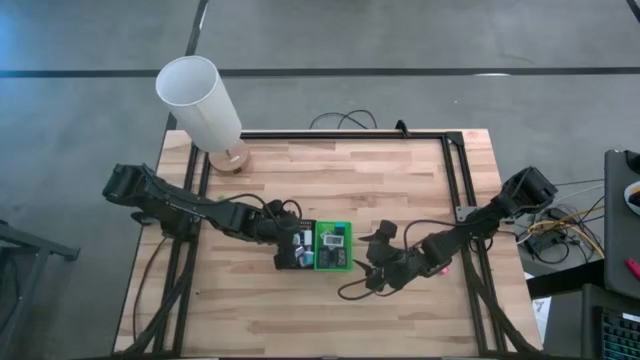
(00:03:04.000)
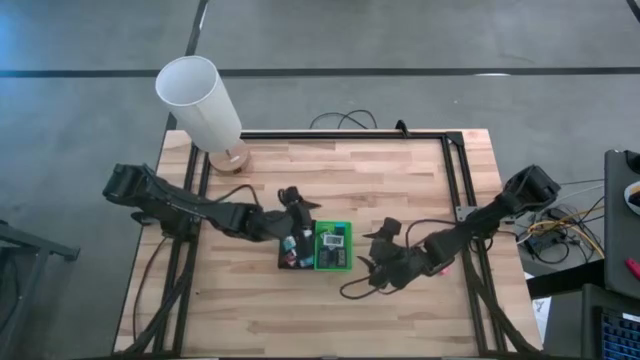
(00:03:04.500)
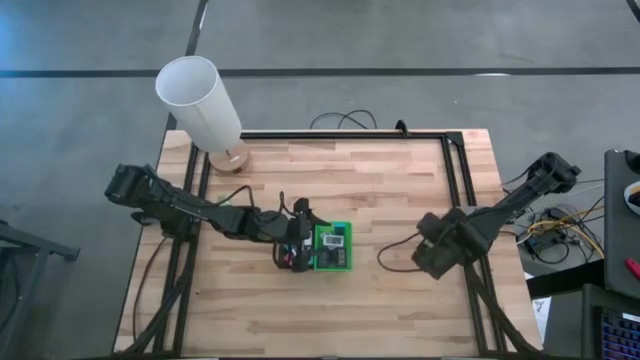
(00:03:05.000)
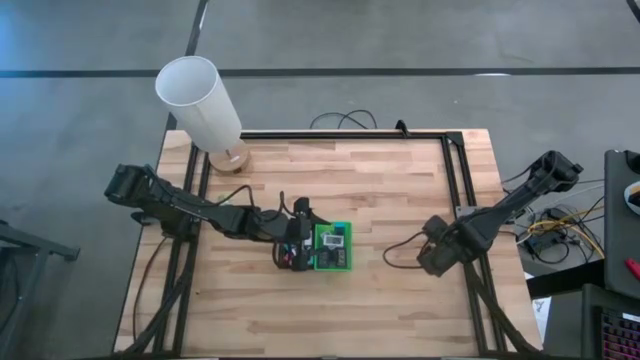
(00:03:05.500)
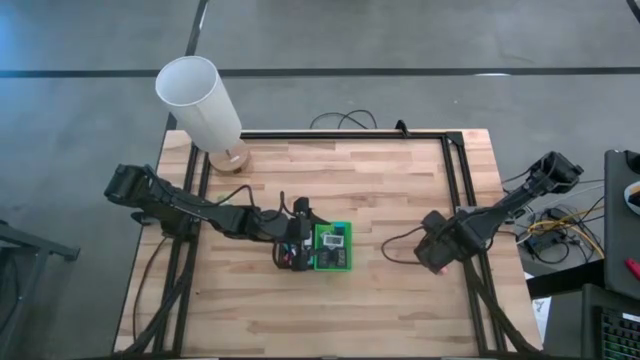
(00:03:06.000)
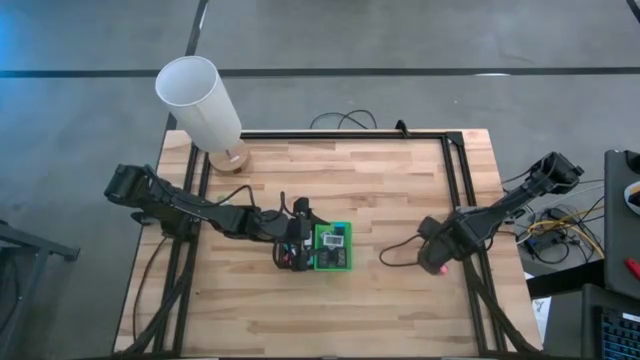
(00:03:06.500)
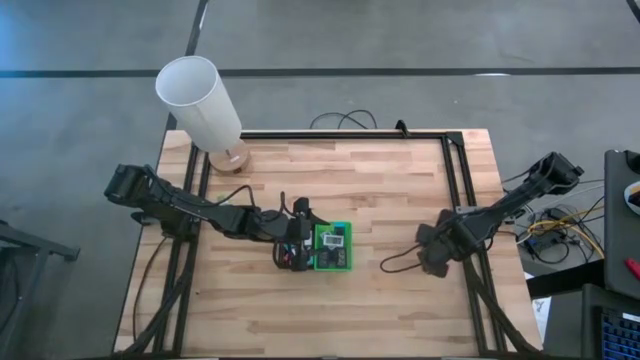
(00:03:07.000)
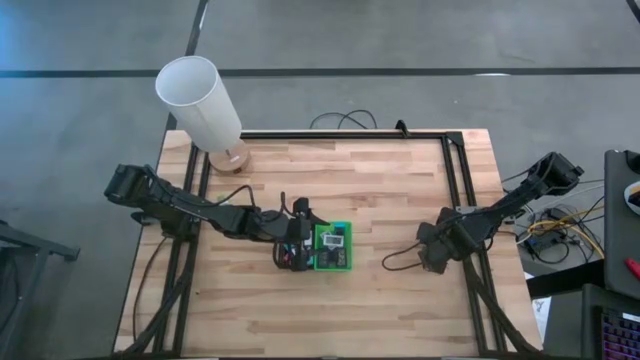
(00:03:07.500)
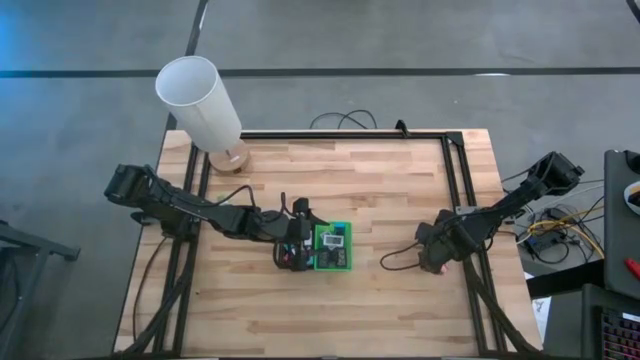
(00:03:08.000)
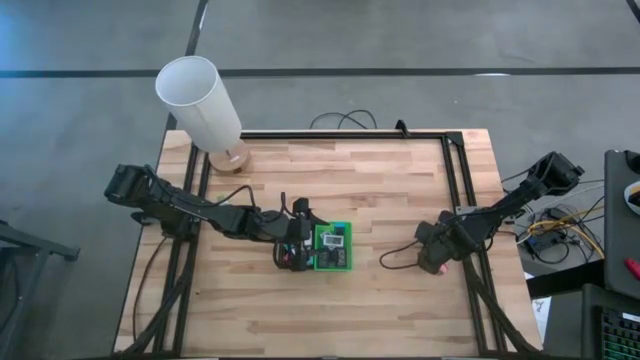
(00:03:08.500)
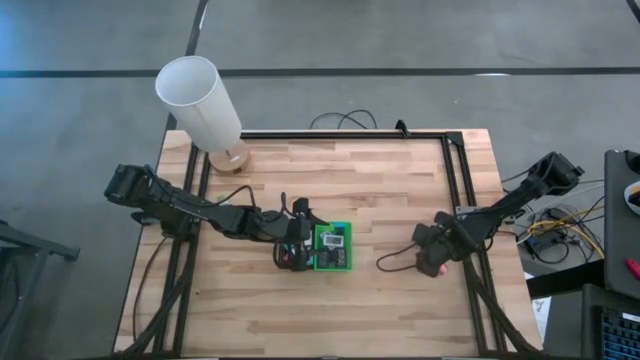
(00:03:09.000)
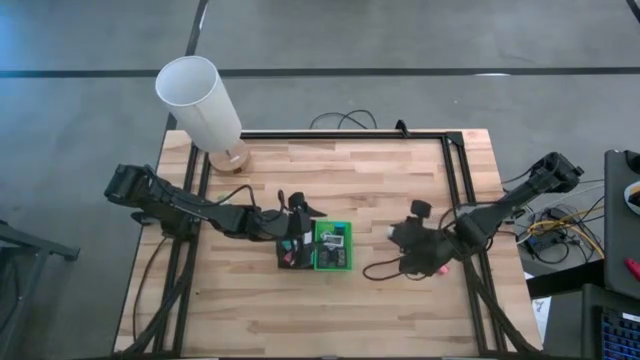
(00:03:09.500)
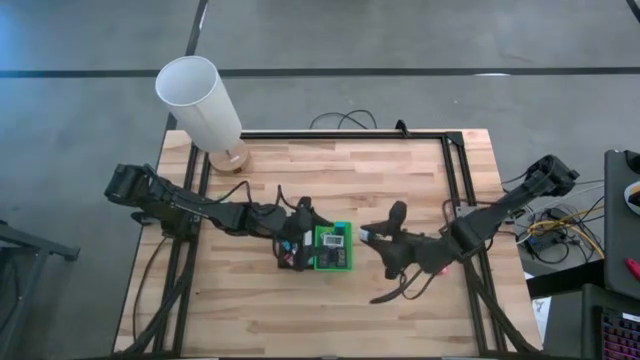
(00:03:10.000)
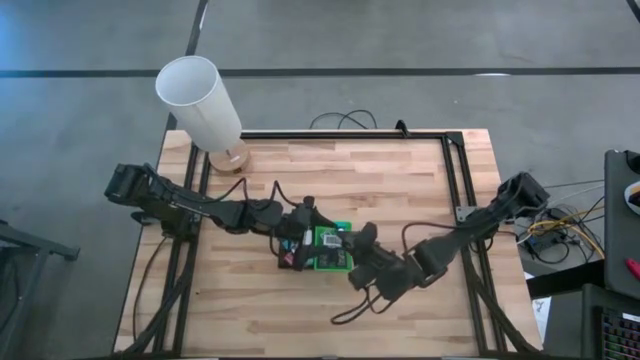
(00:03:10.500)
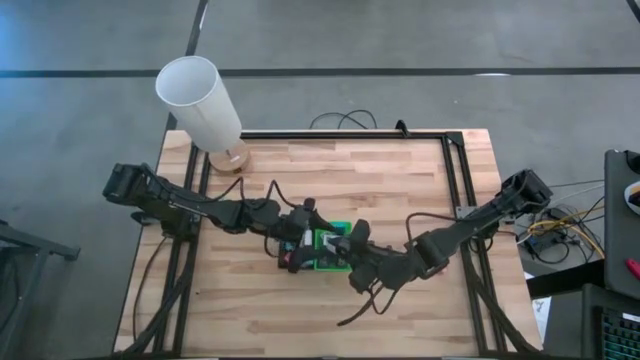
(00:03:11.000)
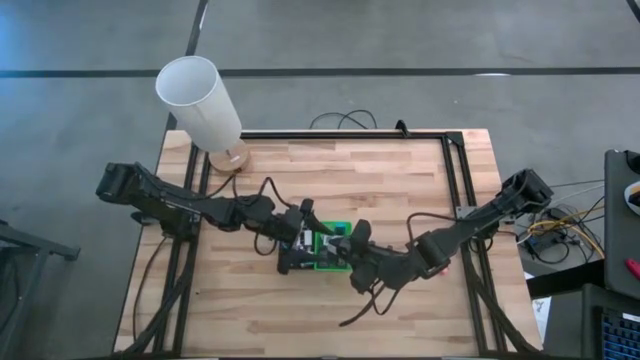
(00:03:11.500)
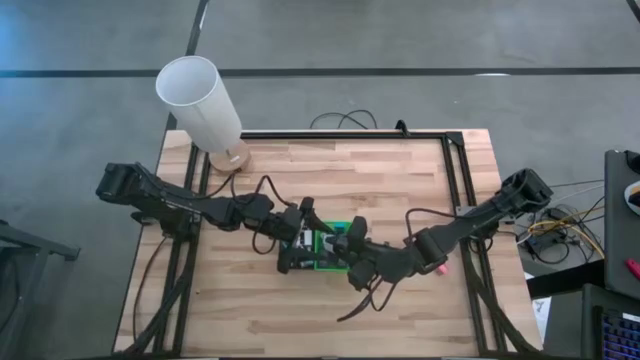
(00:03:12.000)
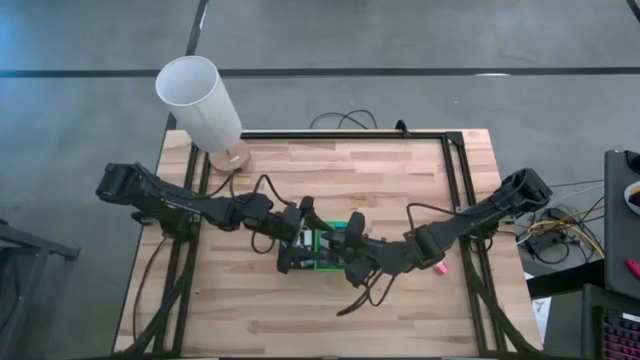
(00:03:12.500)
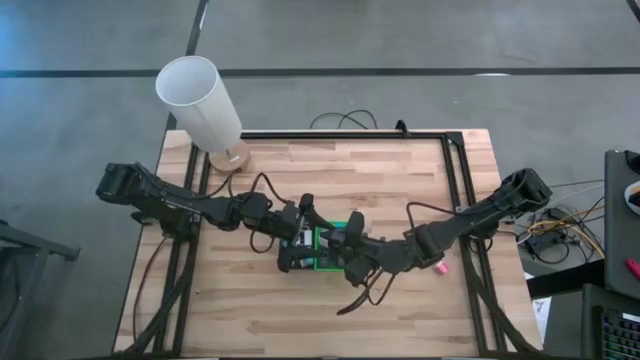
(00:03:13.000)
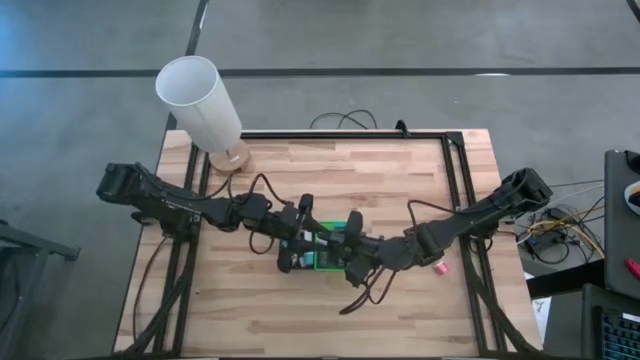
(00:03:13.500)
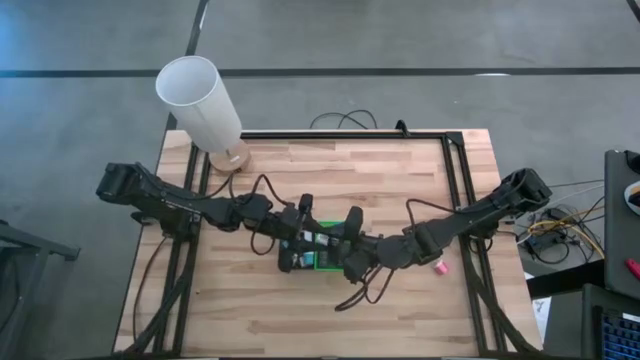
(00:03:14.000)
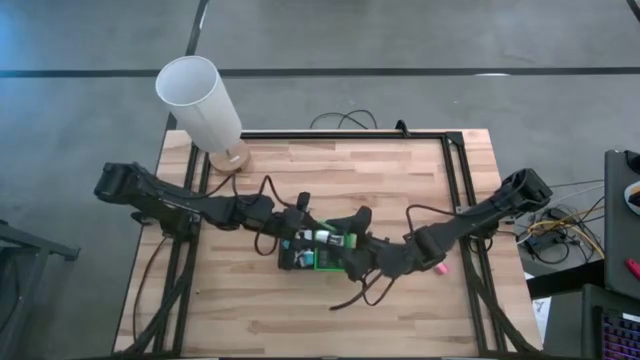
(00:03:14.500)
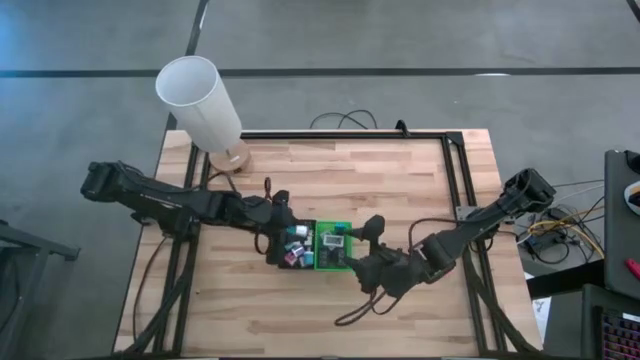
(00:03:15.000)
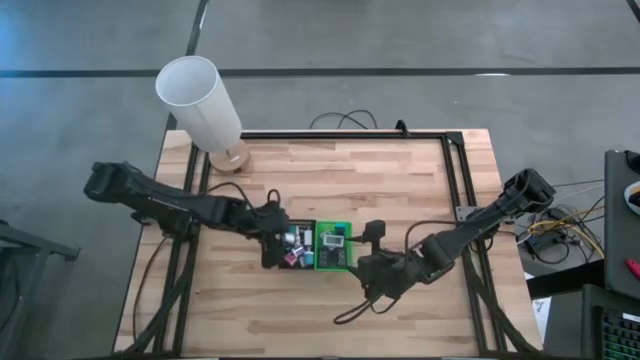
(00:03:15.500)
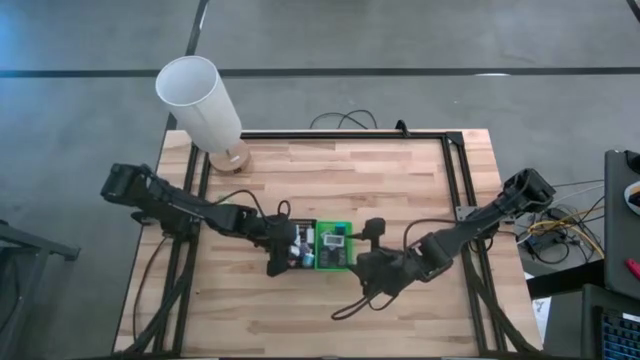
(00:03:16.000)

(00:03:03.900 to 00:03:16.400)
Task: Pick & Place Office items
Put the black white charger adapter into the black bin

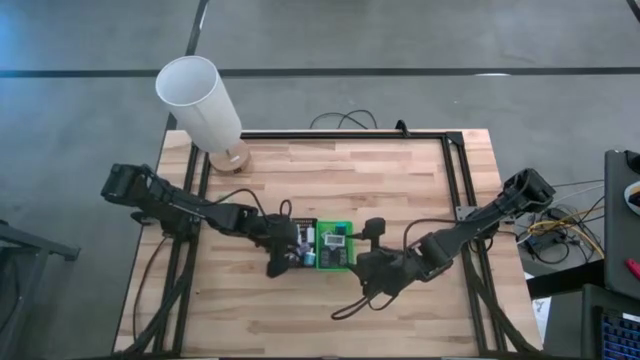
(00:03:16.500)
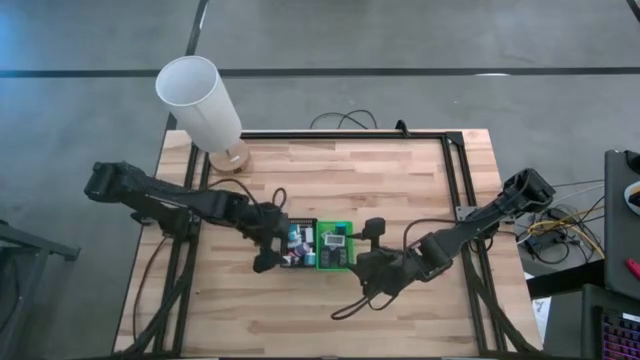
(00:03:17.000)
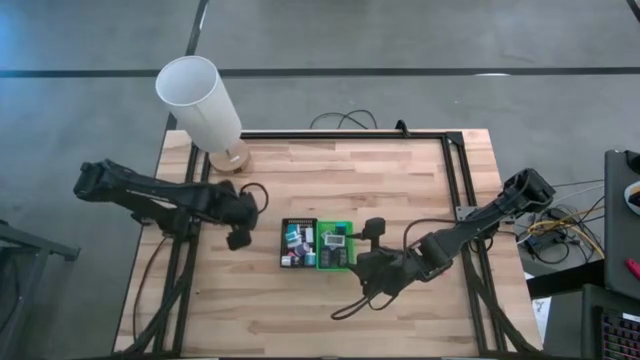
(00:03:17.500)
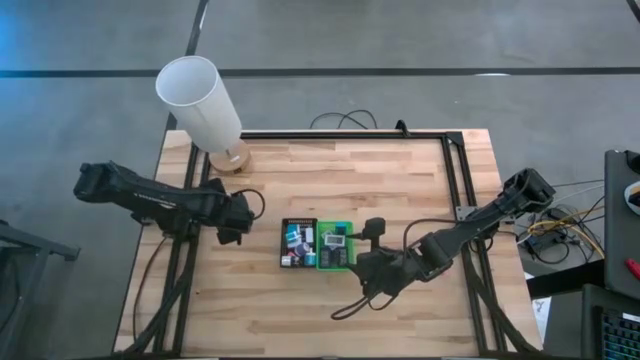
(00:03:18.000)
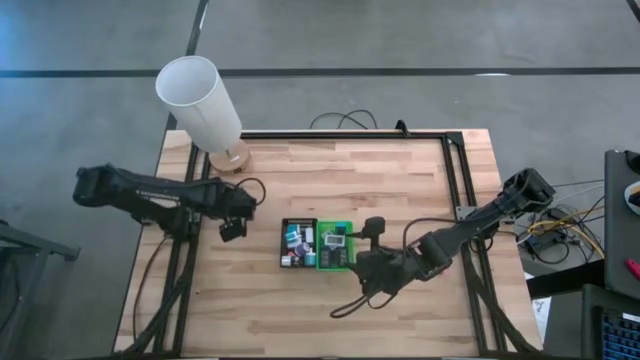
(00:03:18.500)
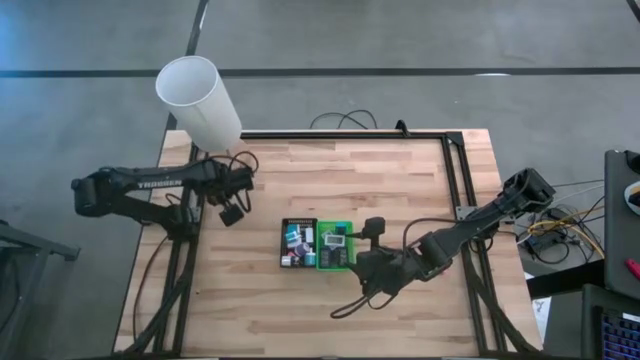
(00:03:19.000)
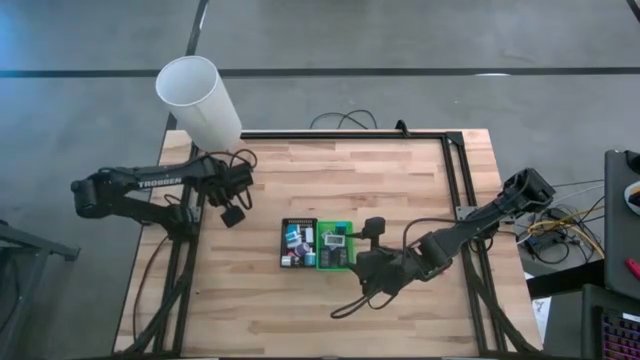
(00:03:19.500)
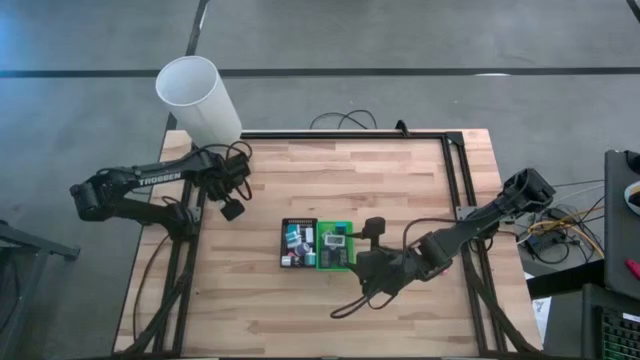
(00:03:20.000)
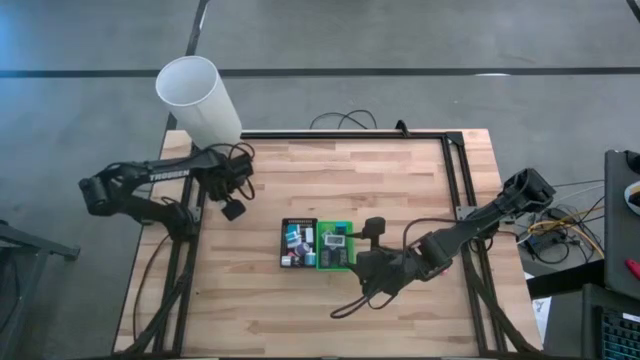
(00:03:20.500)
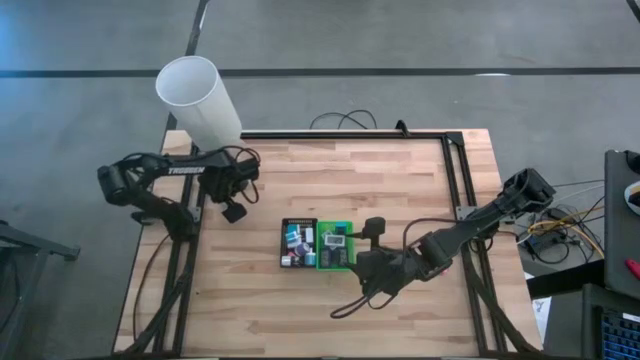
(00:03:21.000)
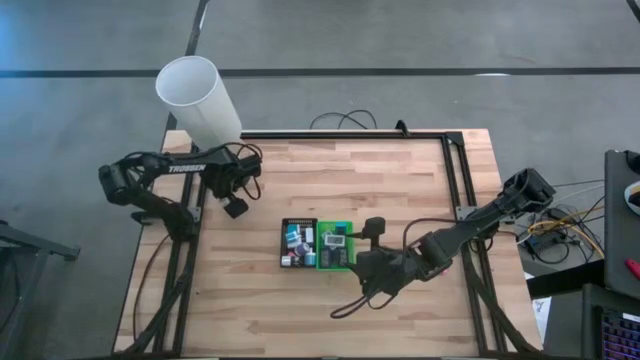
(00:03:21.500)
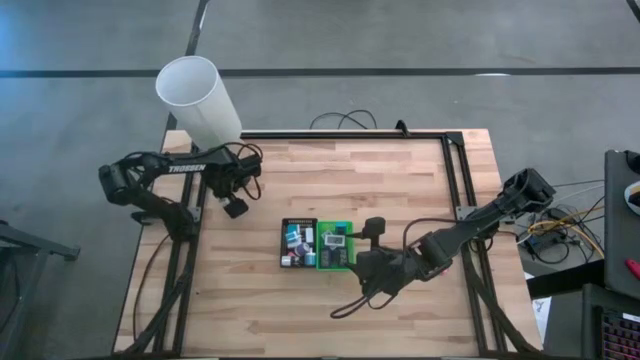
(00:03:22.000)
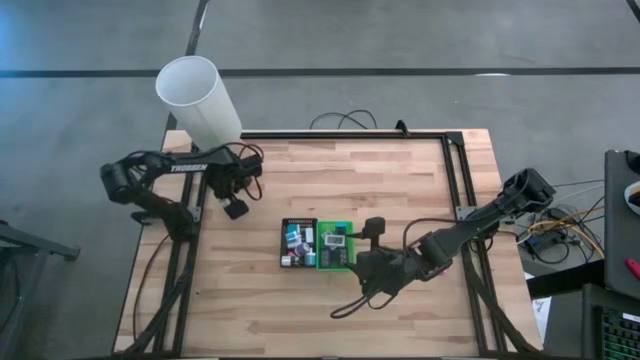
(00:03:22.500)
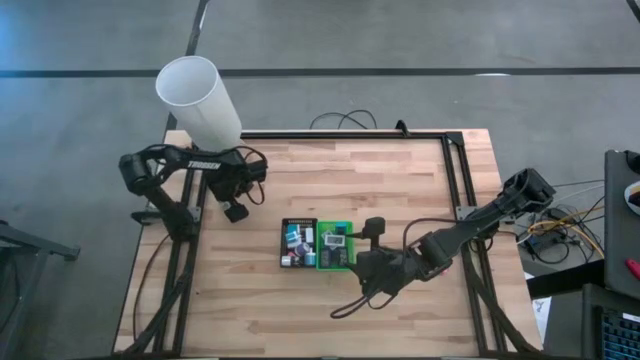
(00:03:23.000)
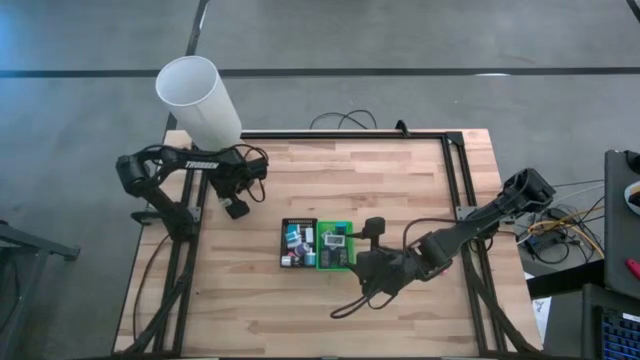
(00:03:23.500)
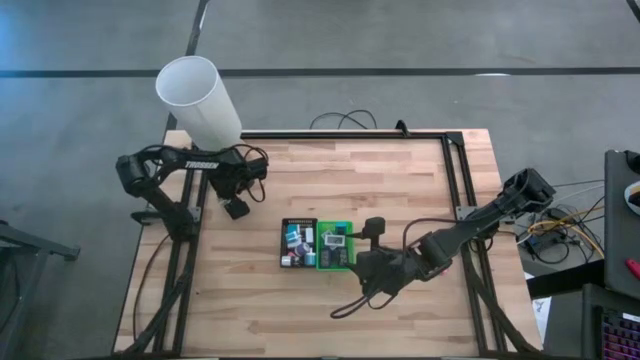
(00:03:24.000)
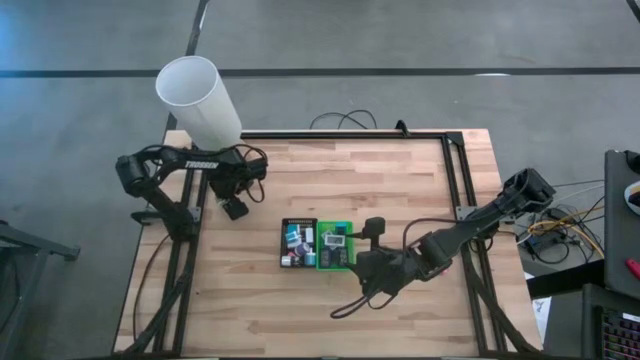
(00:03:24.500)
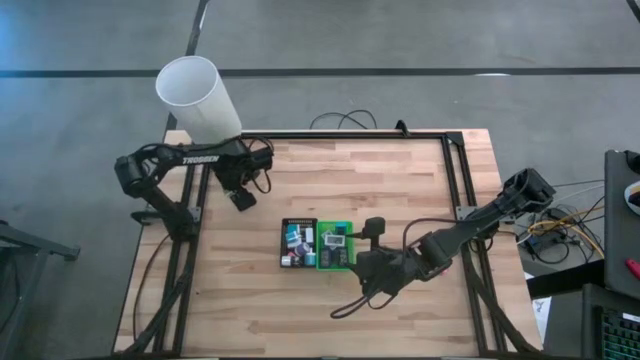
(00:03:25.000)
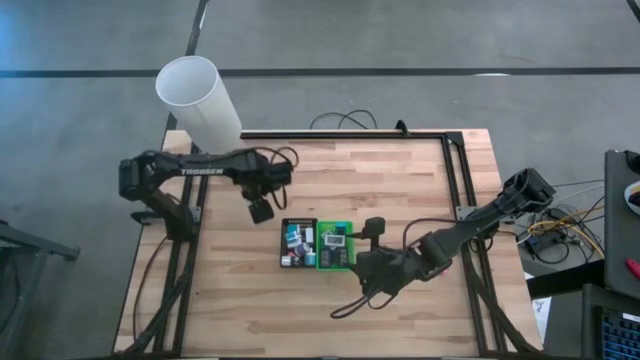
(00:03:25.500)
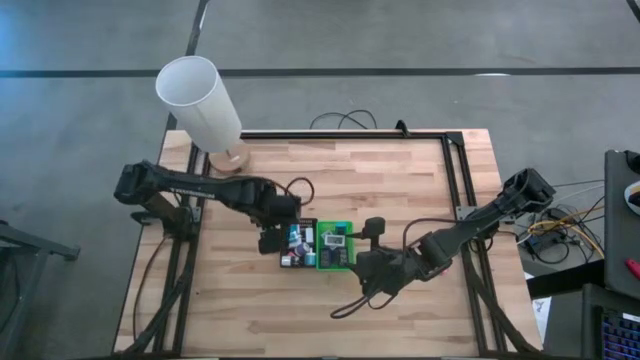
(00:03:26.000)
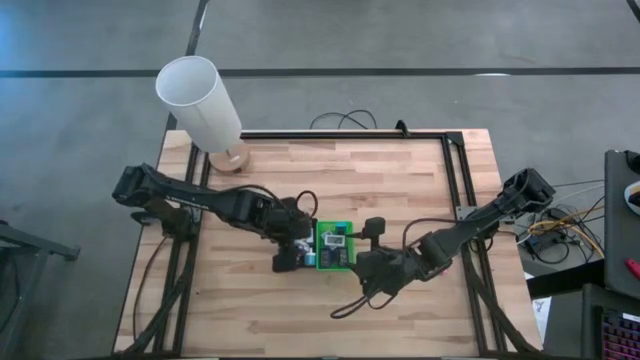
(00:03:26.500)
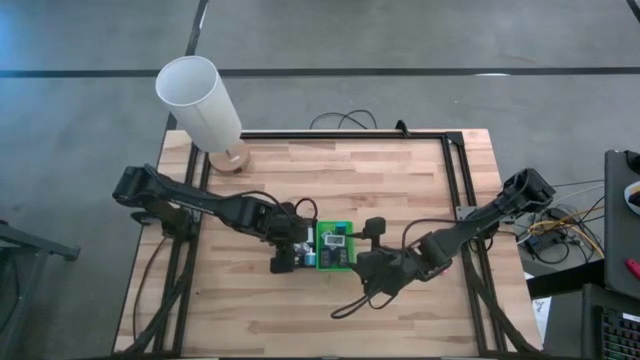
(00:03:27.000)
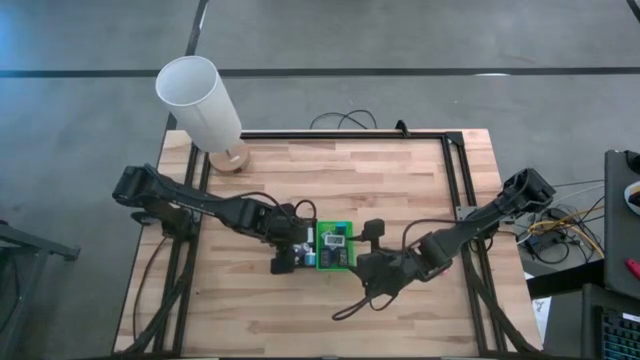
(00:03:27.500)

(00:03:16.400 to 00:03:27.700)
Put the green white charger adapter into the black bin
